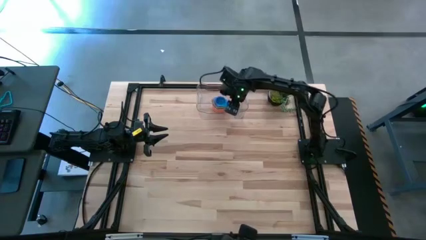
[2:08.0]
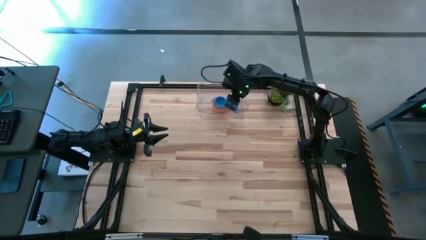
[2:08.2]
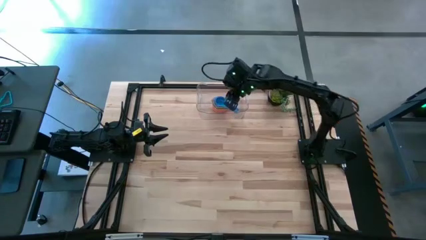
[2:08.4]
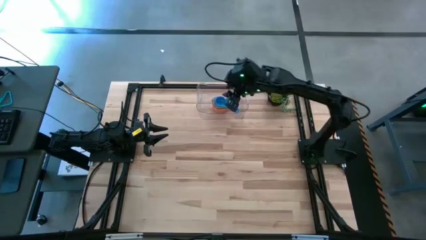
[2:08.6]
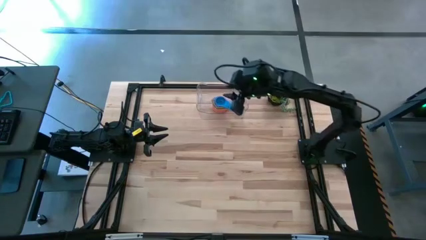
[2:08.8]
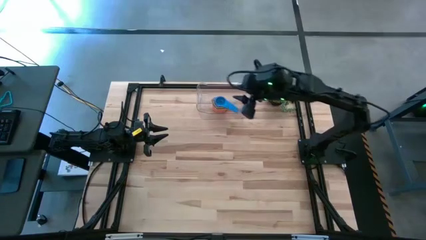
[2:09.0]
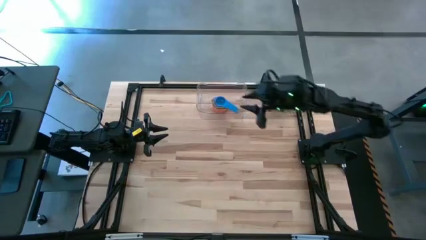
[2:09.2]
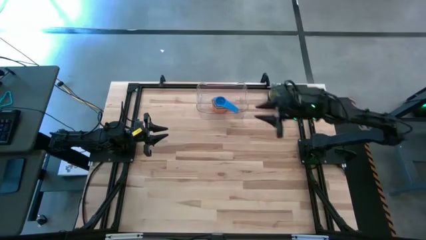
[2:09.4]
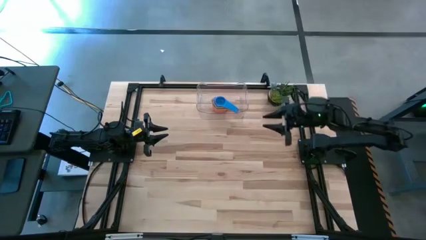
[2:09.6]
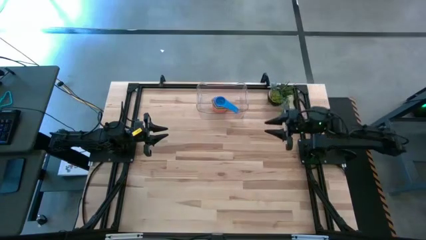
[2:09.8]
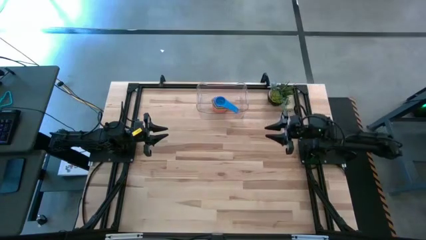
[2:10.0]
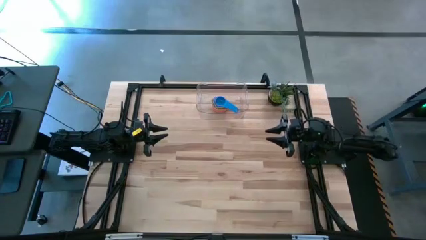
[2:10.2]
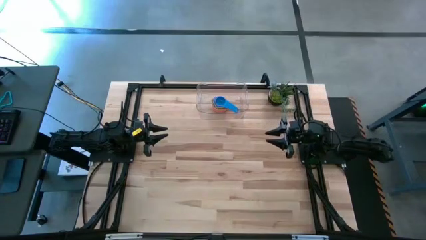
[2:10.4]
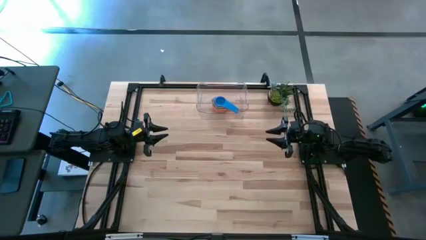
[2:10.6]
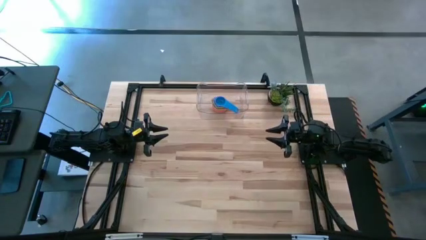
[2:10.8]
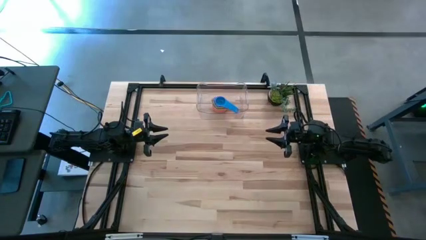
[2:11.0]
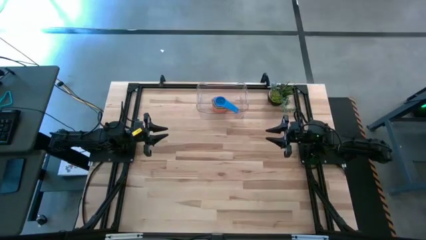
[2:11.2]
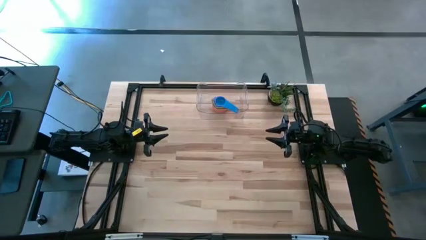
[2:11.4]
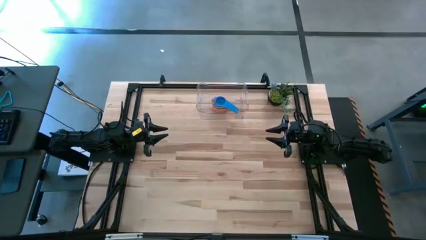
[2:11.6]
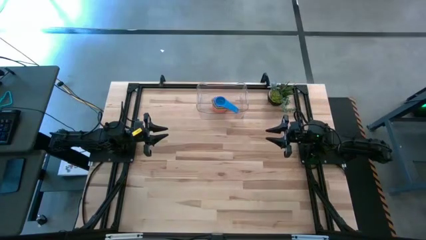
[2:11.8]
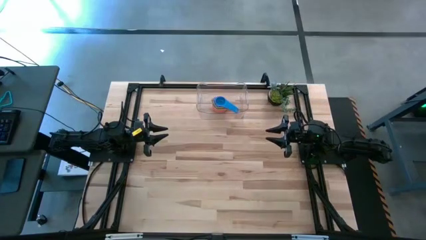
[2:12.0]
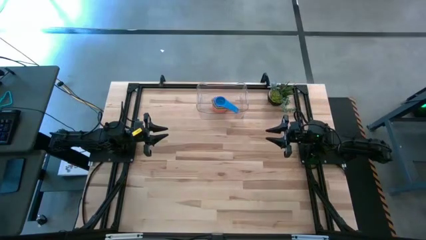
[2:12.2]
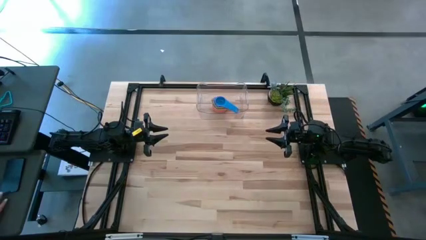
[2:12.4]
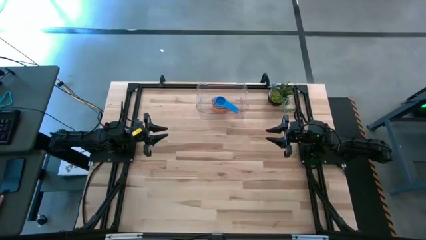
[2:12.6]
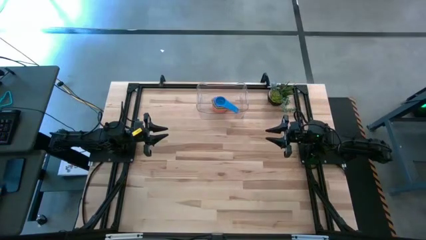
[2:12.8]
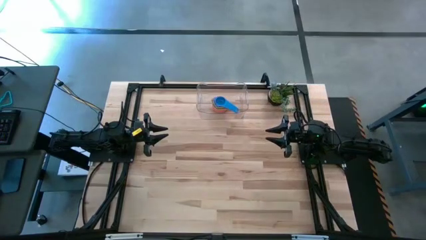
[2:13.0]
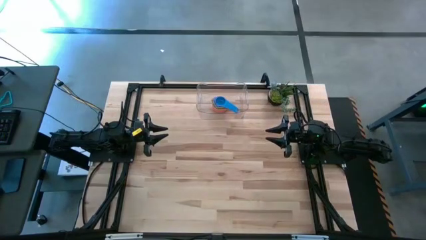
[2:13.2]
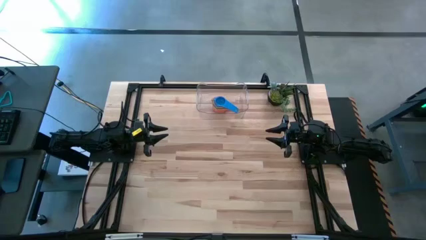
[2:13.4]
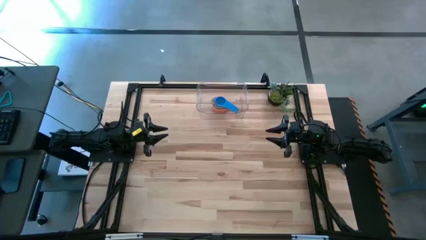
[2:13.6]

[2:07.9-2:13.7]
Task: Nest measuring cups in basket
Return to Home Position

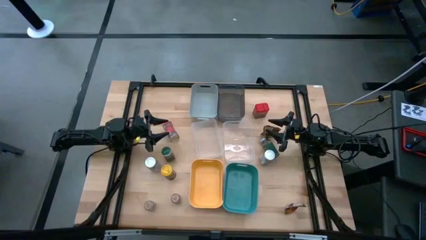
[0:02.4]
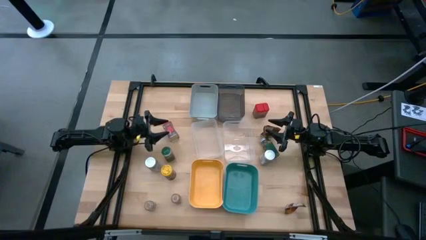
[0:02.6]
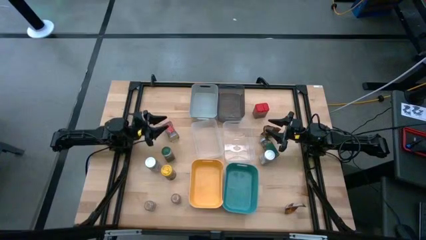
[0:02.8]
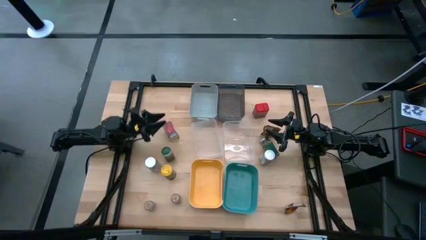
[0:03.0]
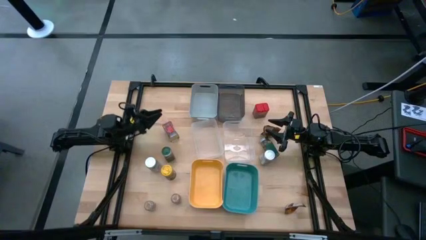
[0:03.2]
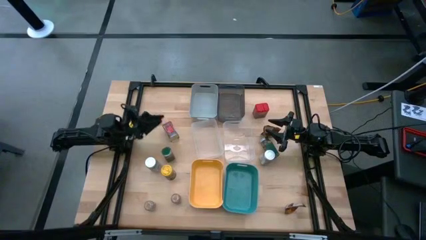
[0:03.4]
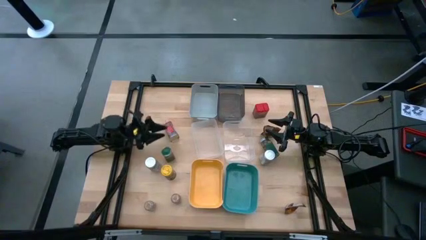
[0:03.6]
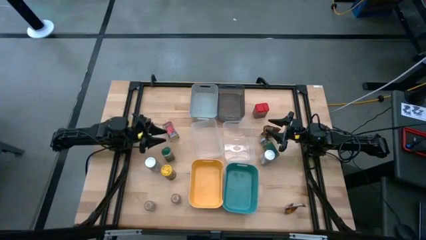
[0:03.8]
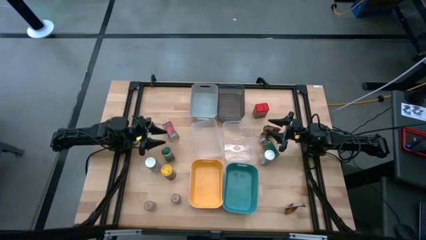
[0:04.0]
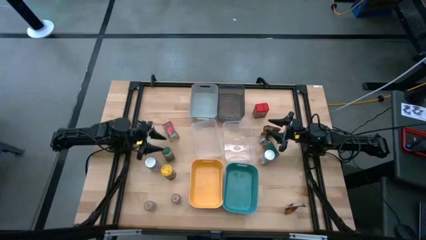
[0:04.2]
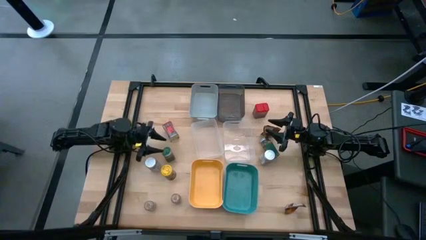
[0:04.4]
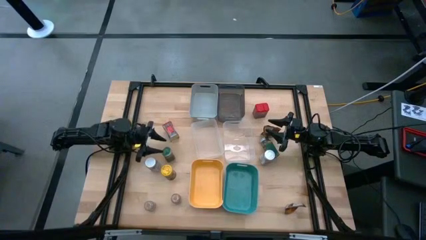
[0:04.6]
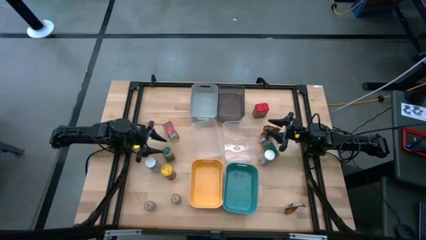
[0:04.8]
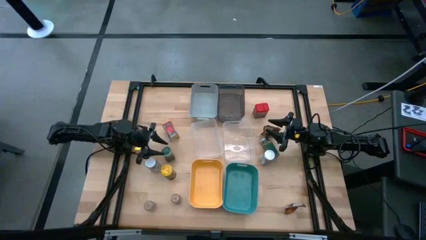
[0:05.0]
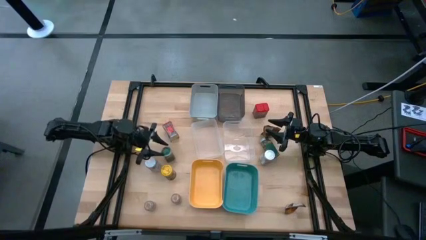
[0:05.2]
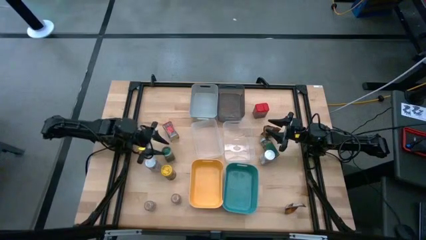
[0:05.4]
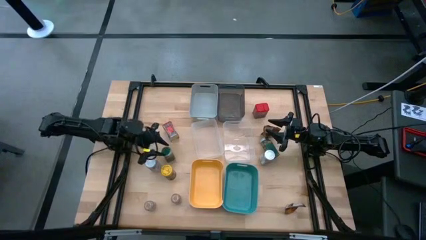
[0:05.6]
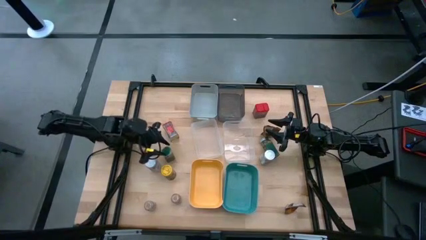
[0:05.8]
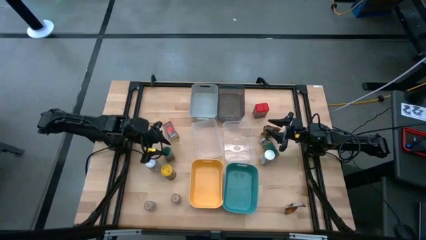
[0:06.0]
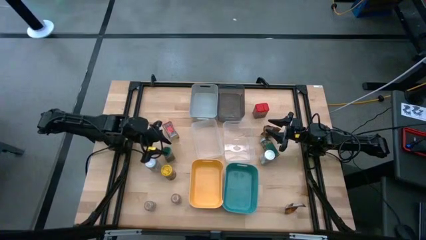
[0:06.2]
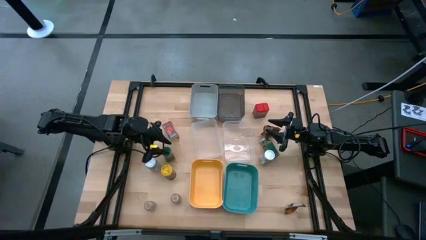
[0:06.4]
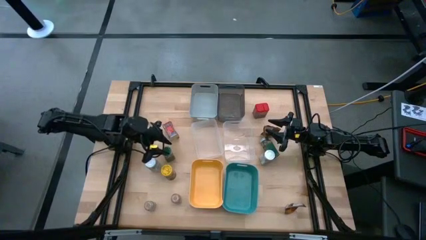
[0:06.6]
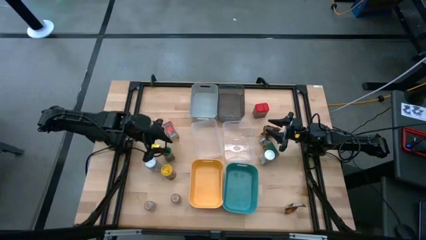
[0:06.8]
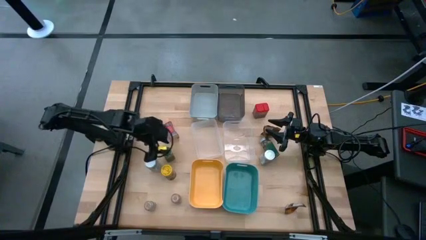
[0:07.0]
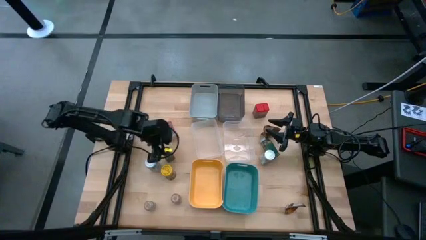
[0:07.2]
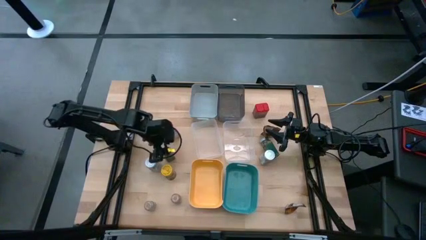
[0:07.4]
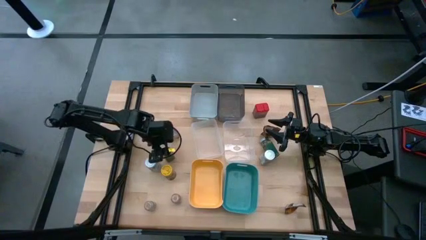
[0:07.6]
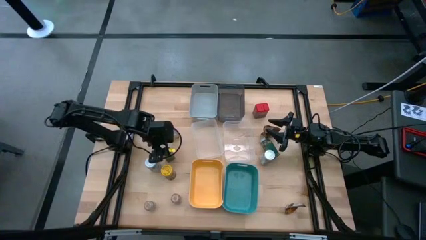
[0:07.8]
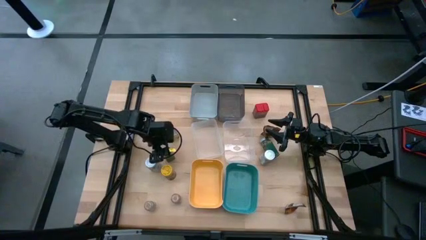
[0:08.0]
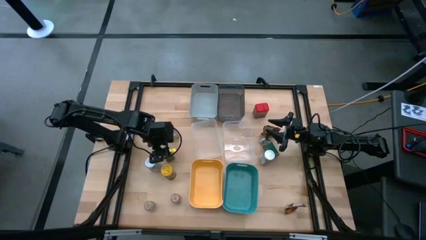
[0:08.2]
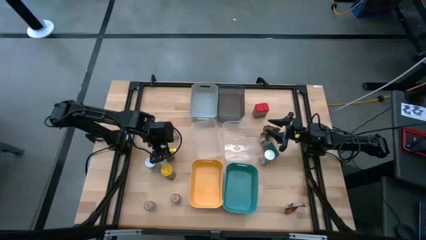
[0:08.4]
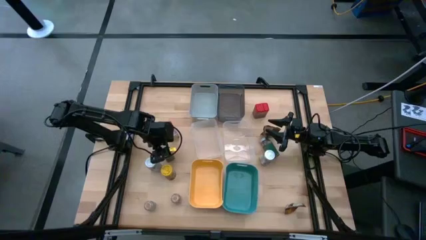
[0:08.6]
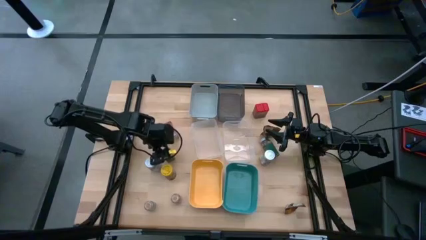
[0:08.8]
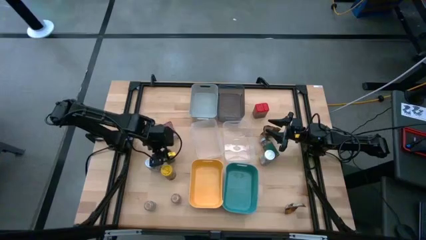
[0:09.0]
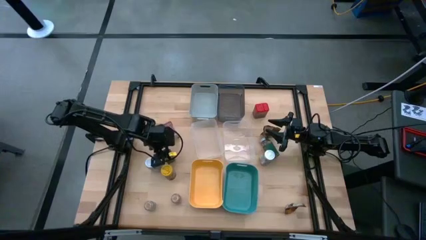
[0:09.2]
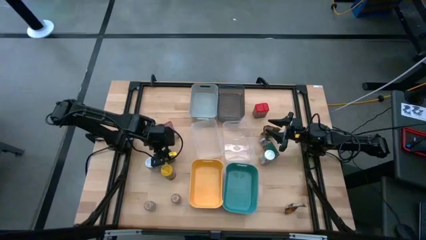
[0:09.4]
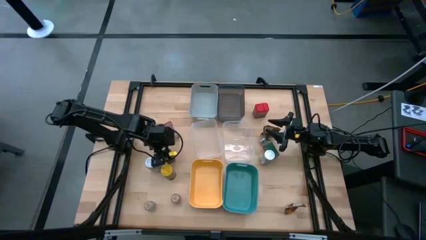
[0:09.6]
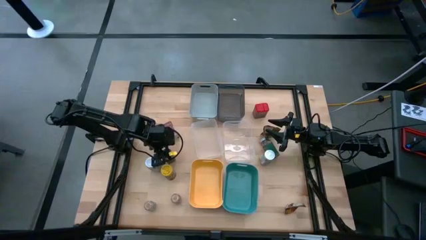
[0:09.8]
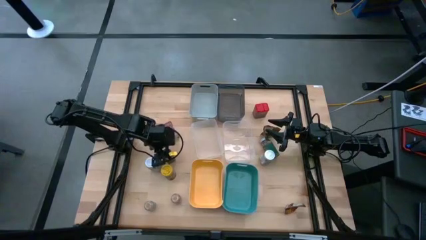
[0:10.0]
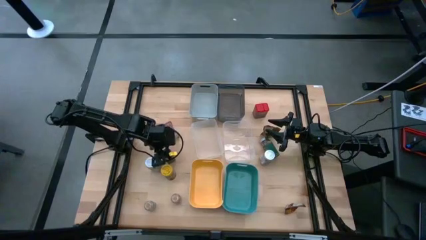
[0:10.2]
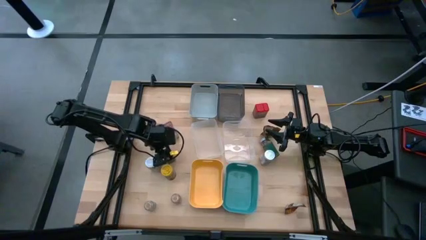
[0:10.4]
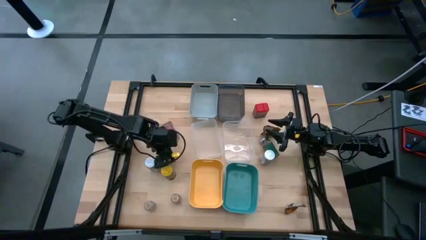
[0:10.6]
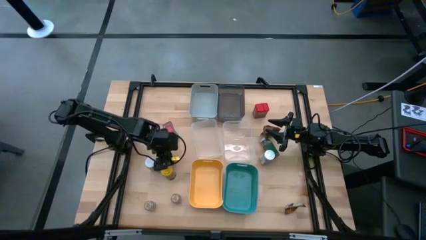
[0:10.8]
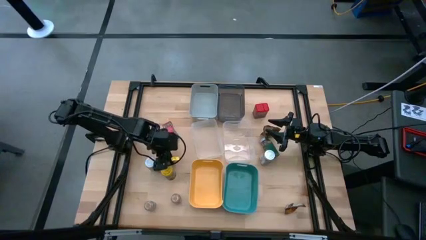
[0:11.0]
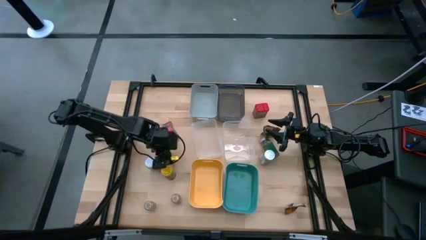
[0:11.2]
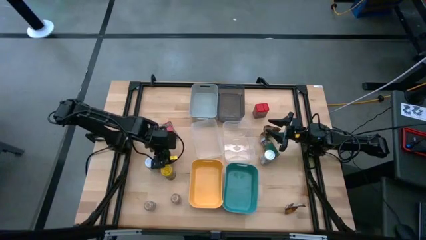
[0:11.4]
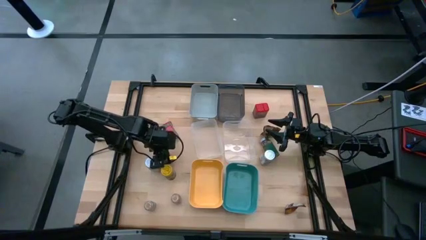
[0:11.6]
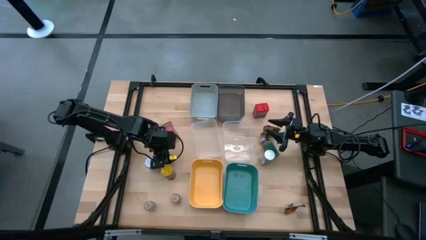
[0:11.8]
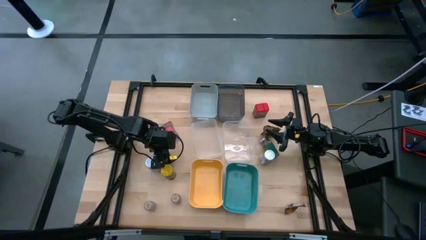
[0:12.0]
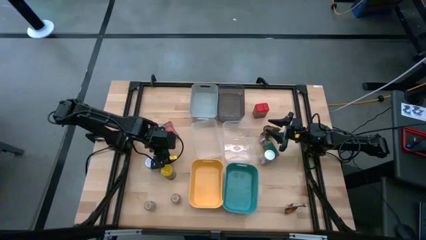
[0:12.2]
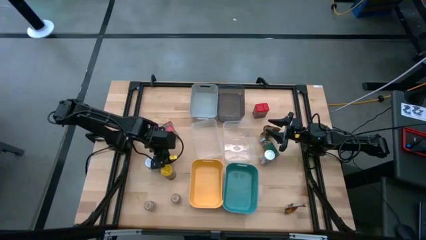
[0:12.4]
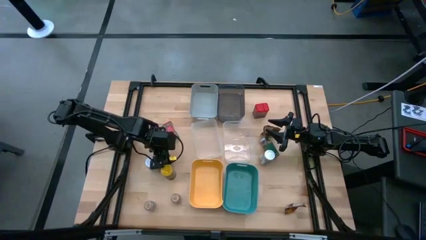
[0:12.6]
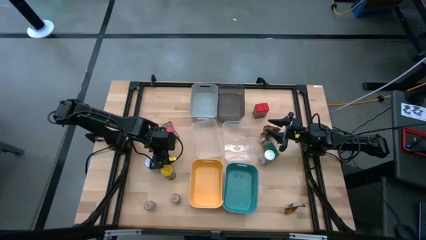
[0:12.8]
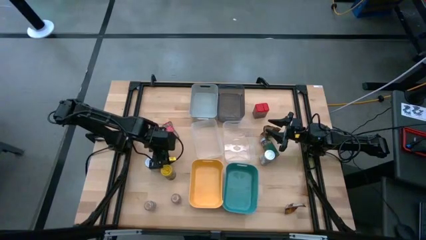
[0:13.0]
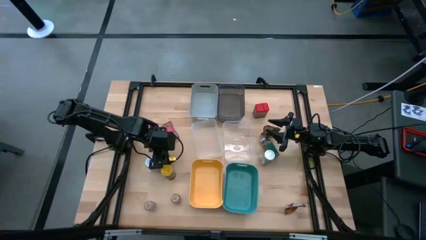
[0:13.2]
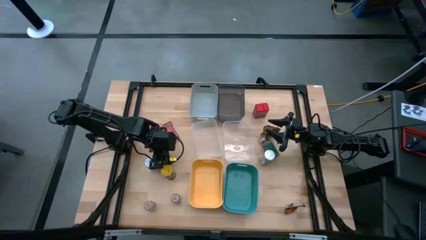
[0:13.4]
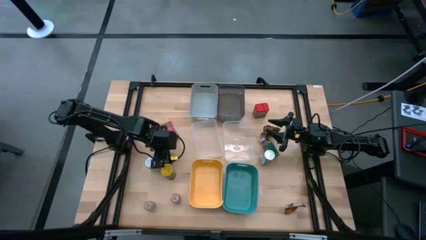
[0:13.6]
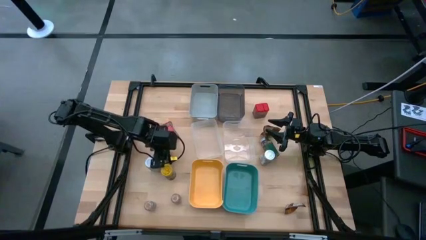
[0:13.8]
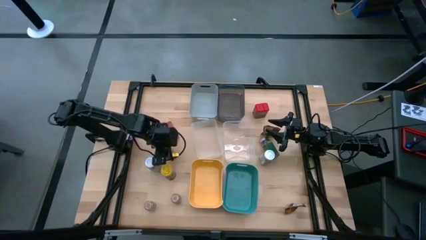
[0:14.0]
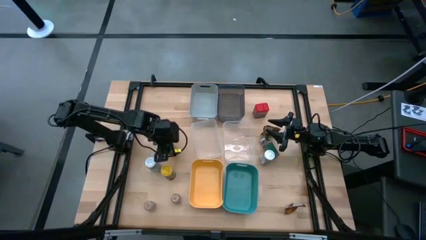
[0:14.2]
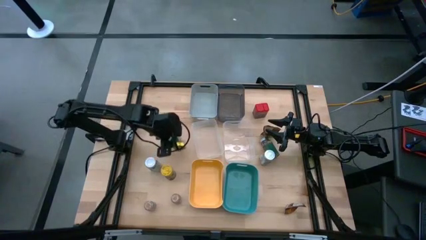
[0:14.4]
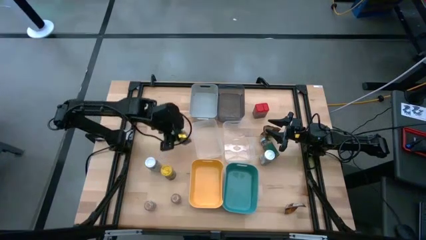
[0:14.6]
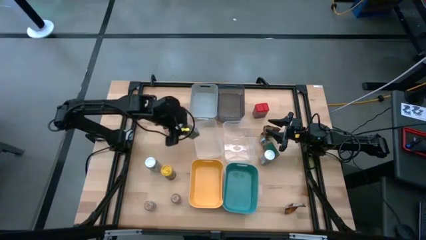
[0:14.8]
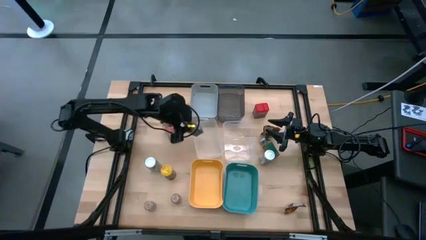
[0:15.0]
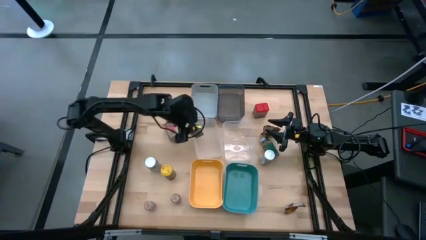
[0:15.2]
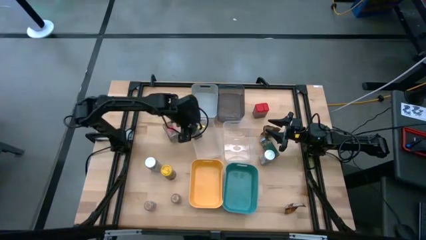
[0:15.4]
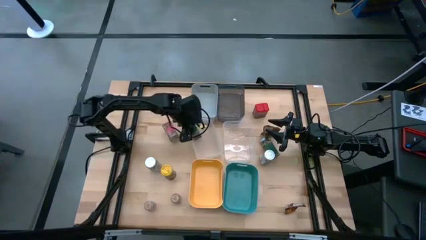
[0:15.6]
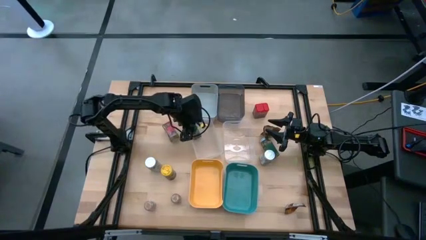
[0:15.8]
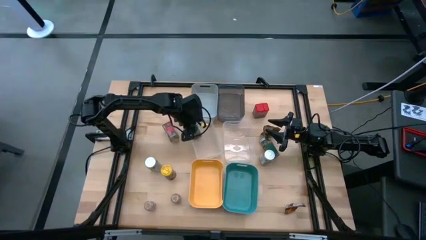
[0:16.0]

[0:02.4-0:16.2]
Task: Sort spices by type
Put the left green seasoning bottle into the left transparent bin
